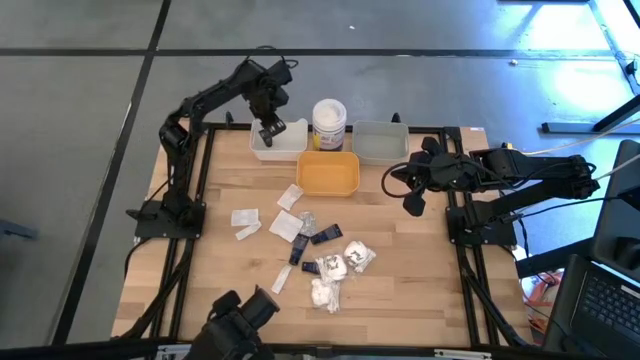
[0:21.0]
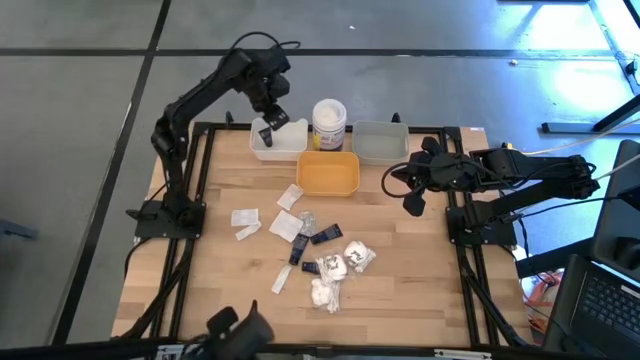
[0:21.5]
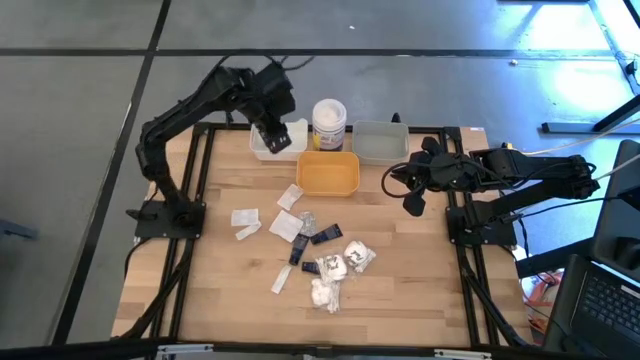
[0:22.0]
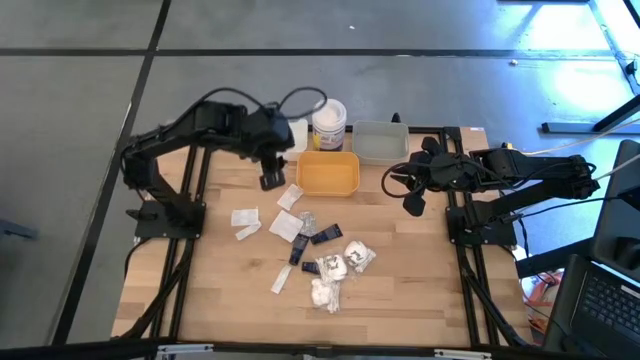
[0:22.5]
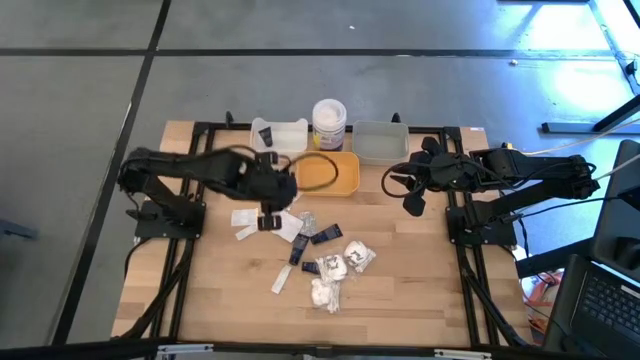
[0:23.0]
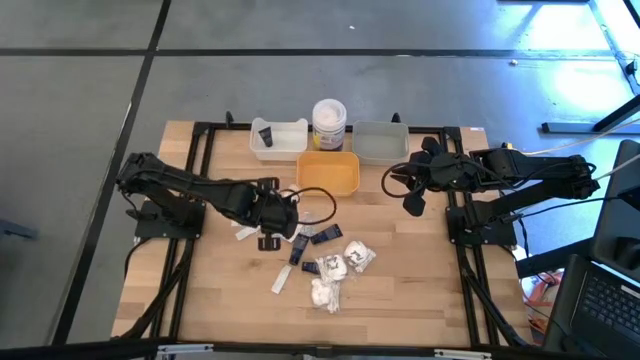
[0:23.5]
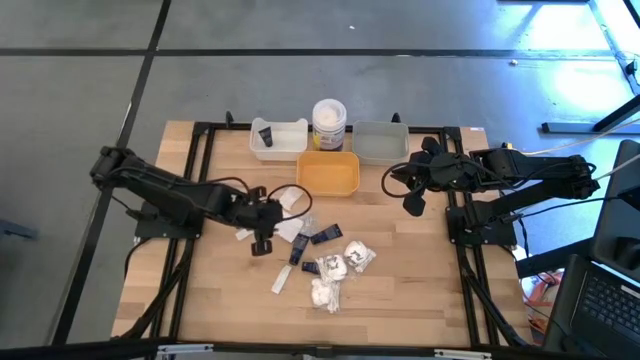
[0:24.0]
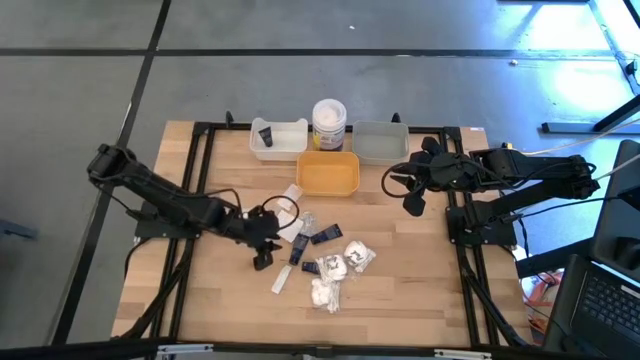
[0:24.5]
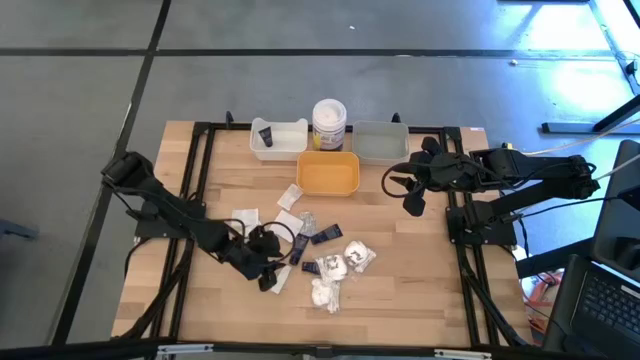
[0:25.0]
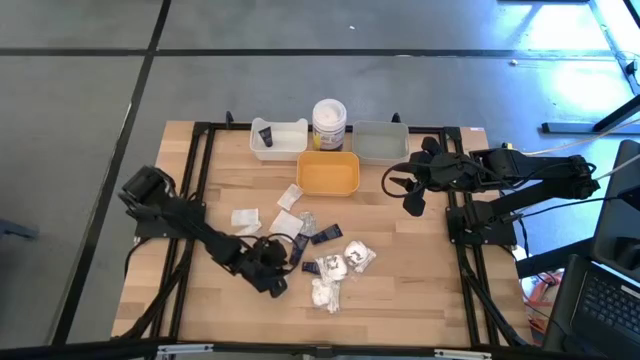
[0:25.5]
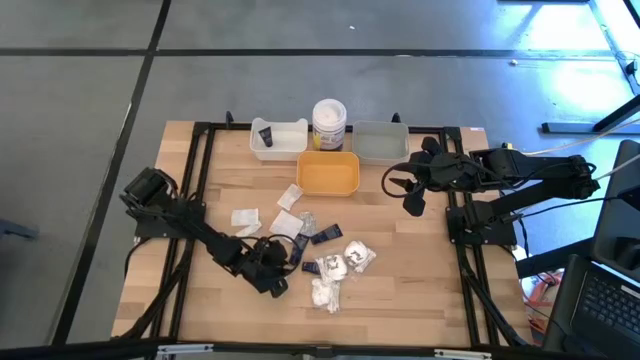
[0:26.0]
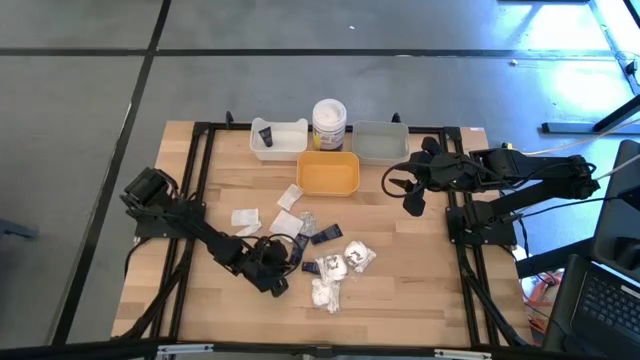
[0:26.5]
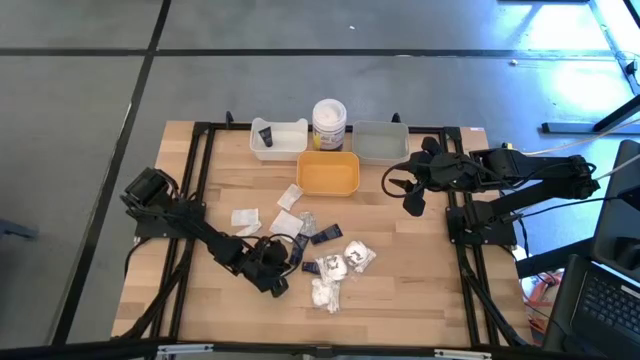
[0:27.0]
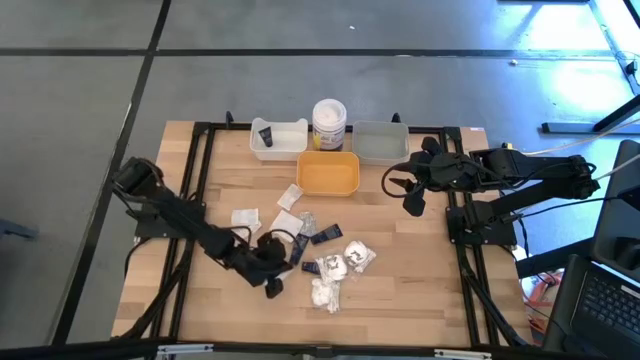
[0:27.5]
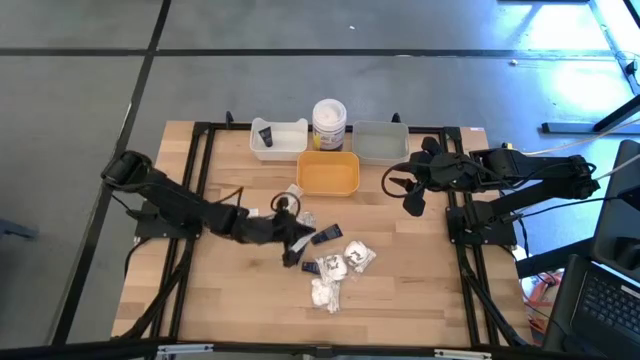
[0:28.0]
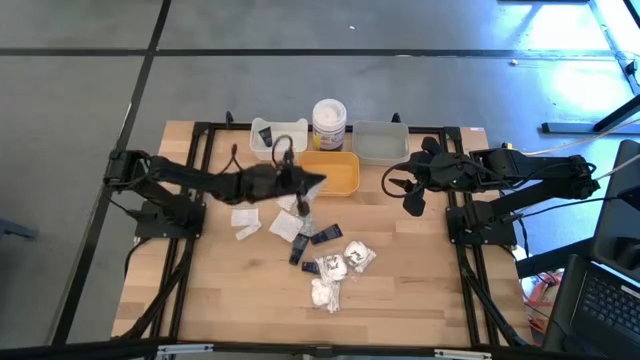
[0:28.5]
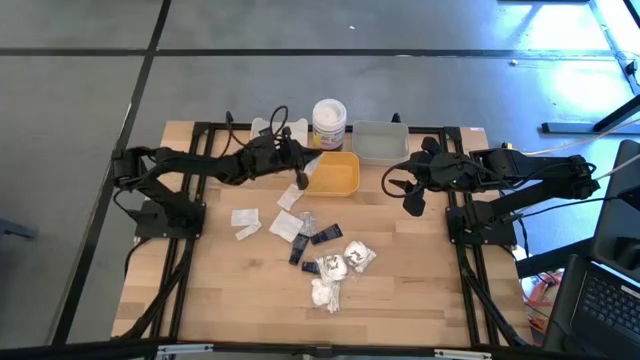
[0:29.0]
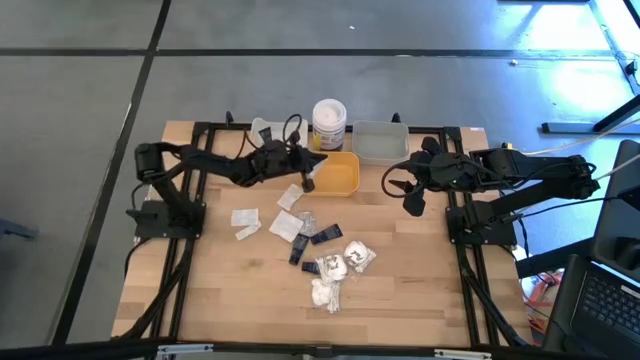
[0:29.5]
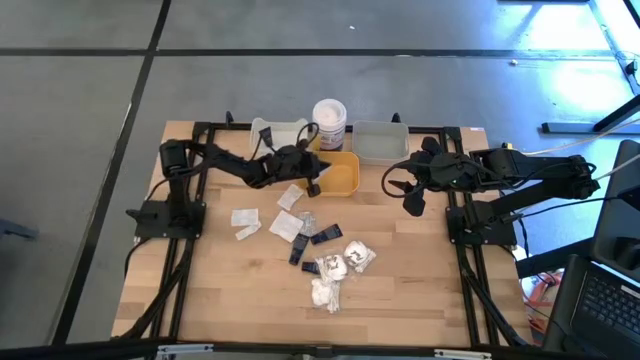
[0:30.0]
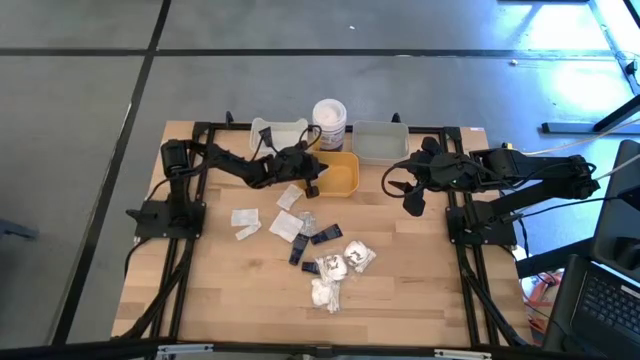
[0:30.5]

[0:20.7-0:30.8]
Task: Pick & Place Travel size toiletries
Put the white bandage into the yellow bin

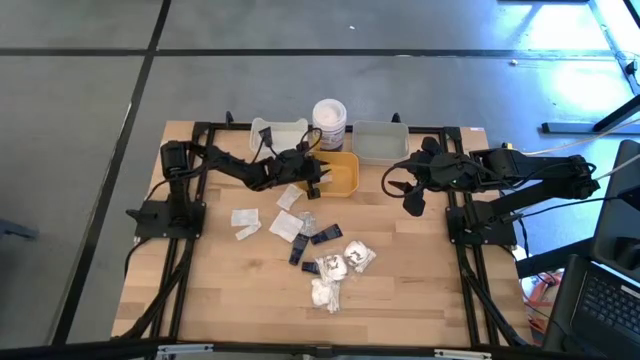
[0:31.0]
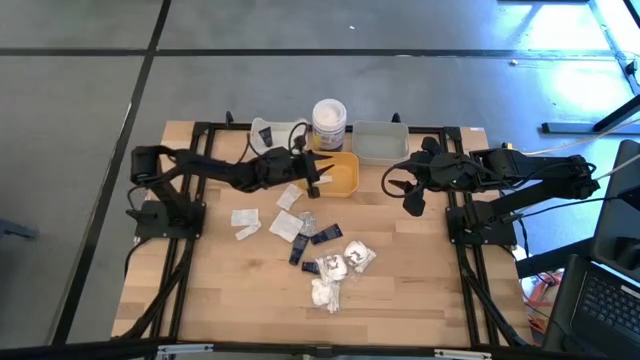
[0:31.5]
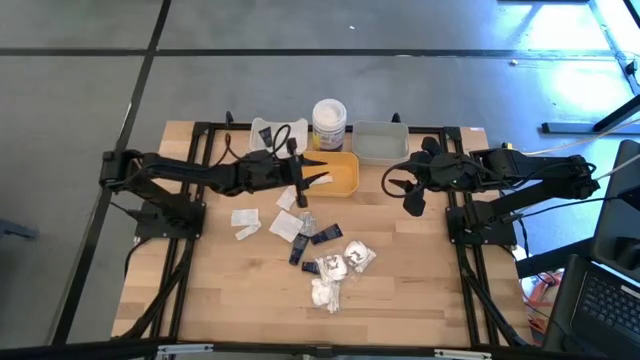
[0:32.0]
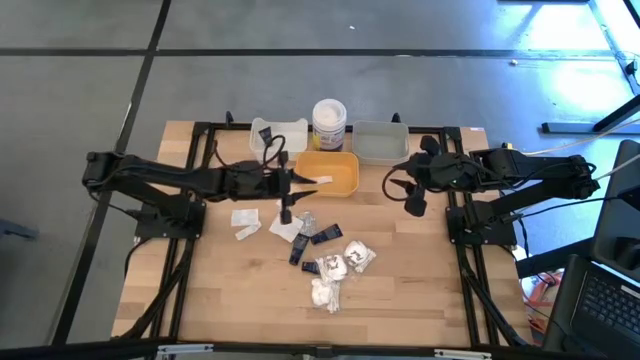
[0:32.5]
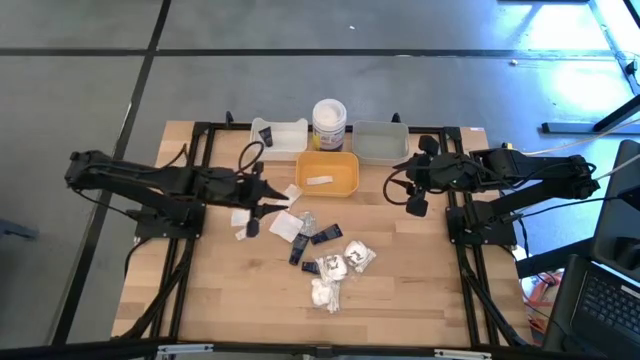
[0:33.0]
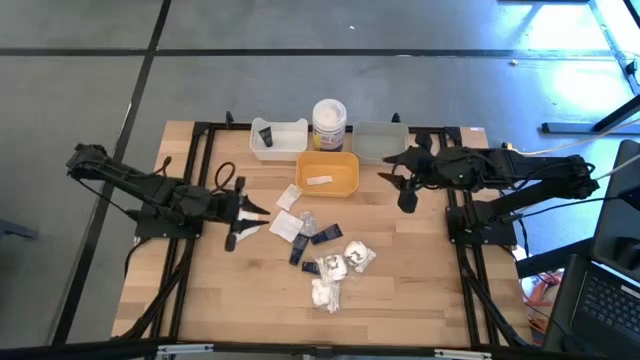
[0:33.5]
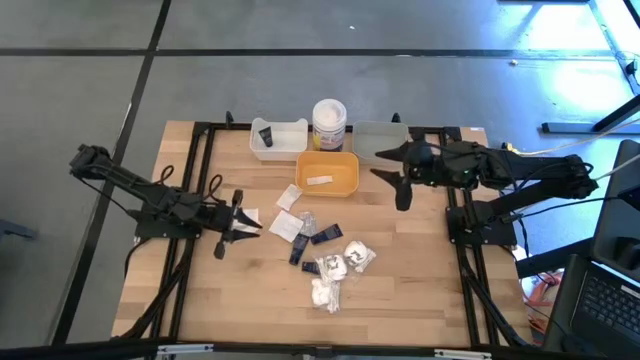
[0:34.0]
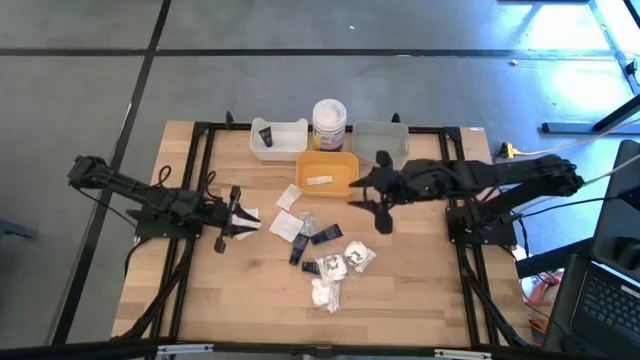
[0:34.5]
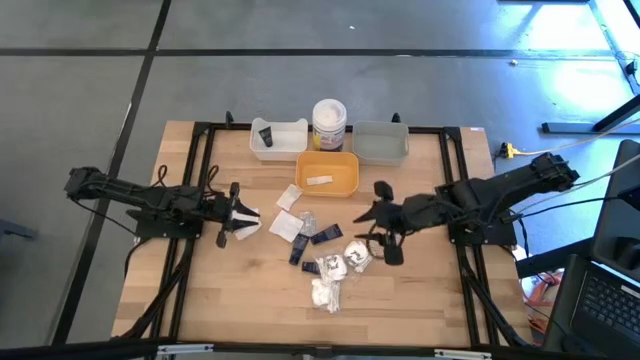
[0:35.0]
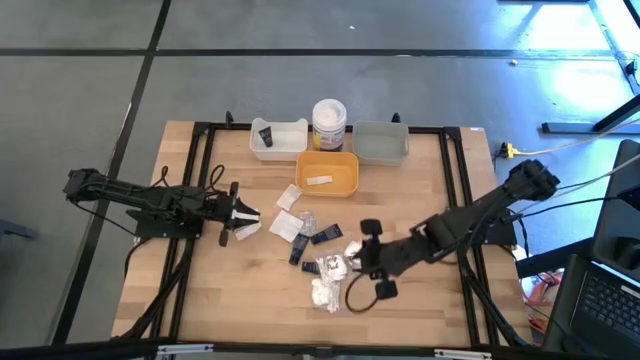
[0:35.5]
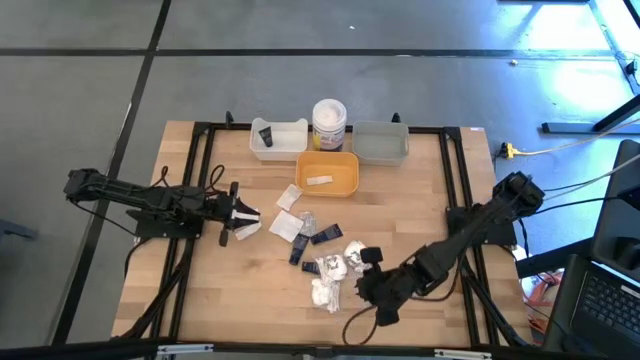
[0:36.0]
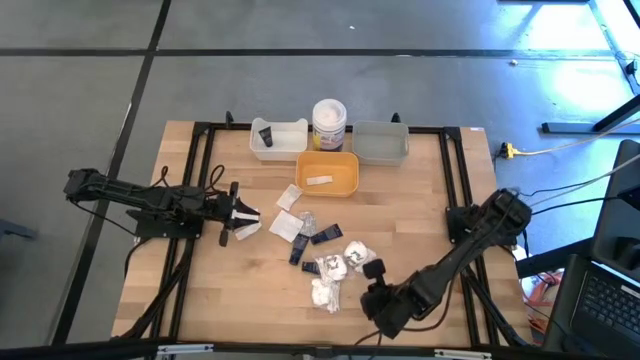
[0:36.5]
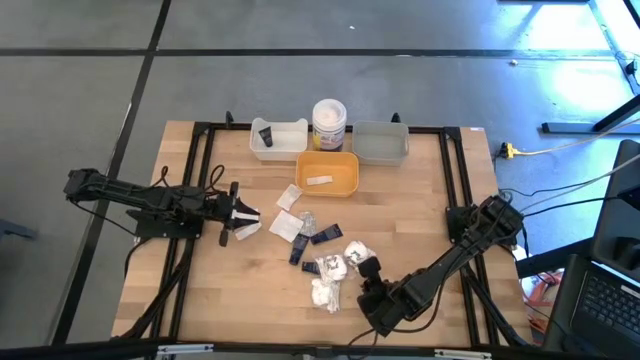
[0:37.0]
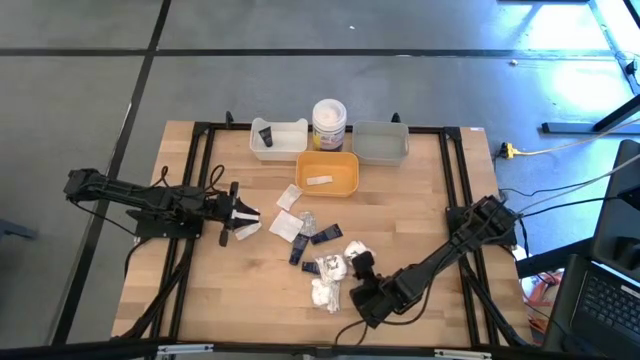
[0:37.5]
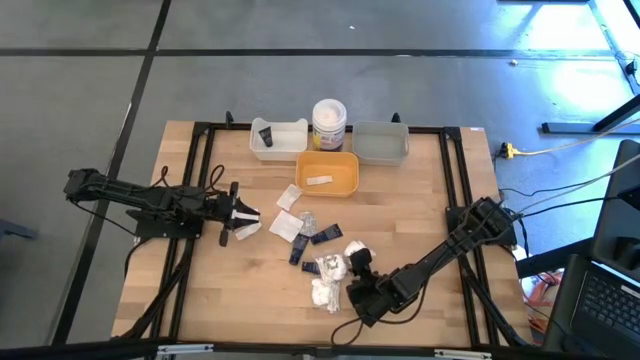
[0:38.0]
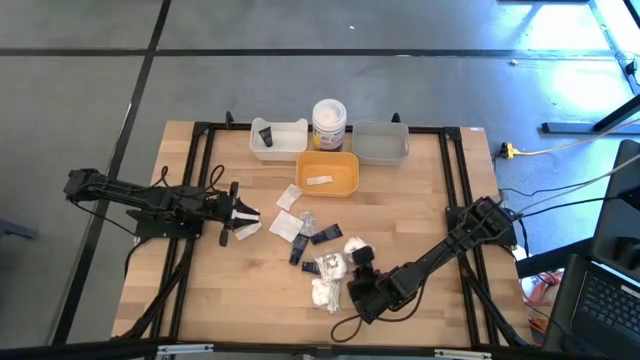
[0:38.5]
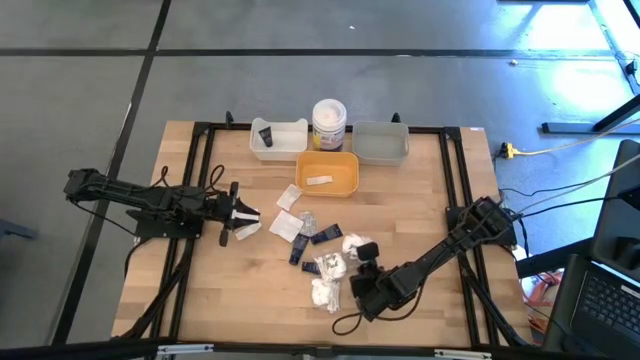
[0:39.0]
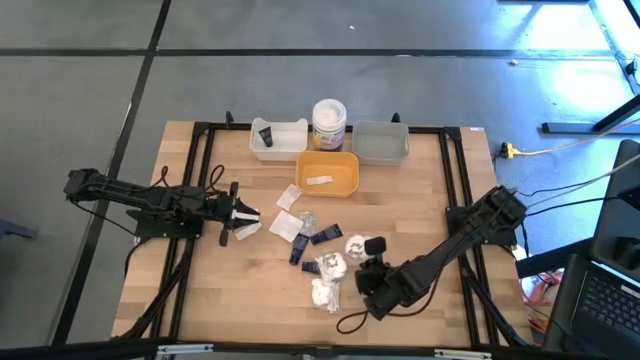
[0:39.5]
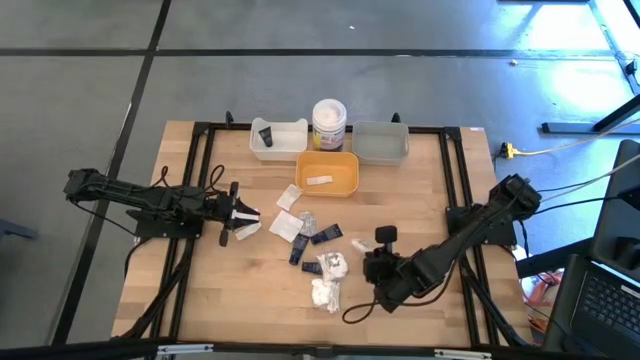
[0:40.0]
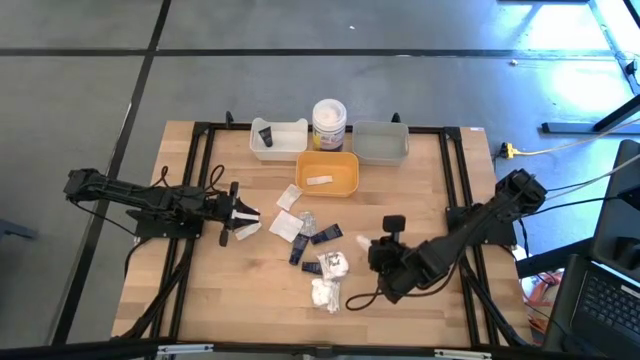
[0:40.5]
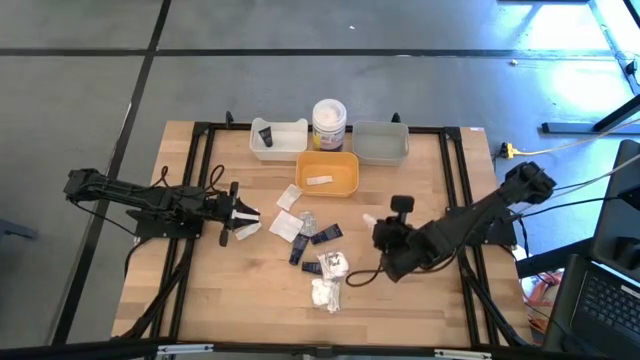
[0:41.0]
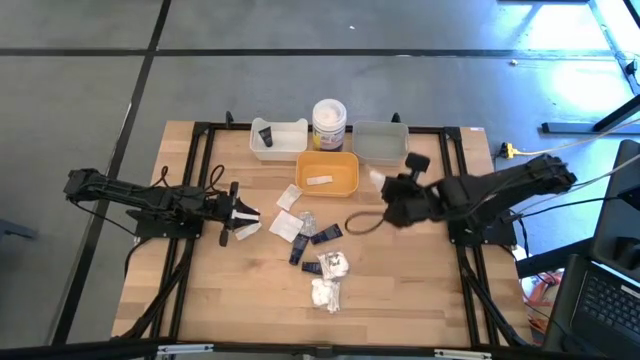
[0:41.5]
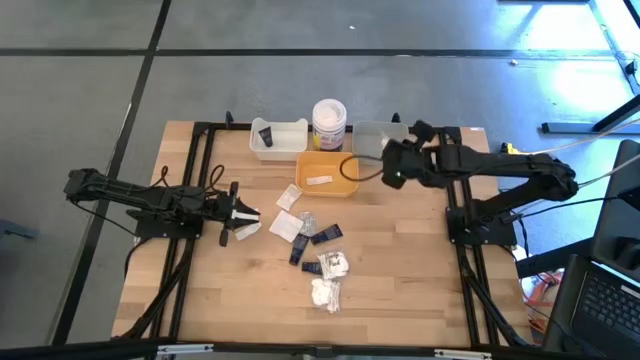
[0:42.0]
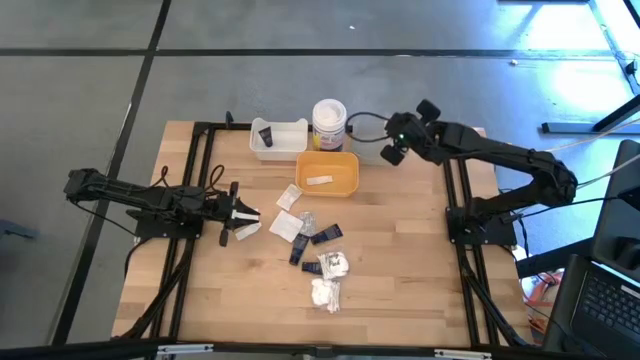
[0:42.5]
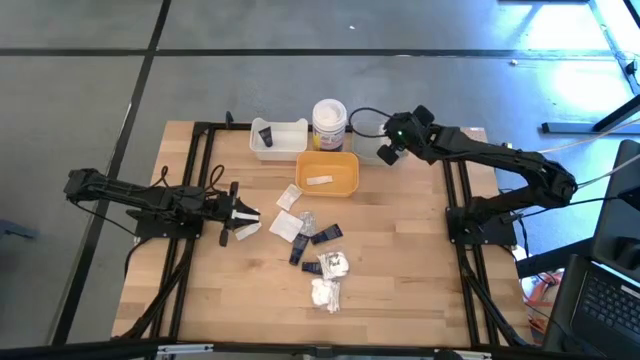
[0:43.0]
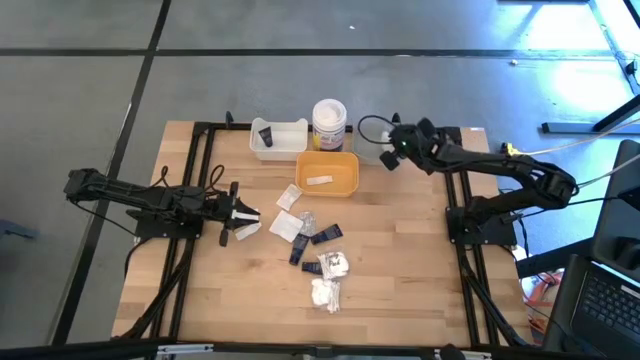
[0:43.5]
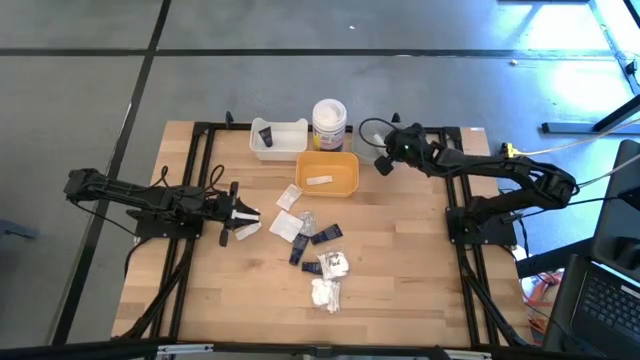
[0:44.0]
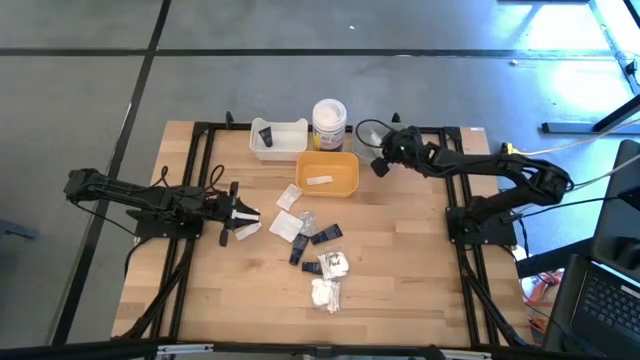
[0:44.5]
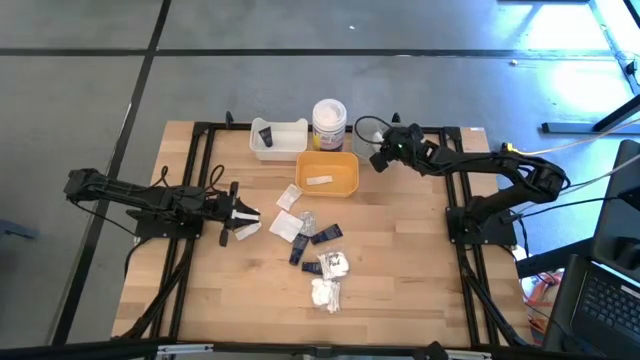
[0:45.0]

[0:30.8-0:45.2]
Put the white cotton pack into the gray bin
